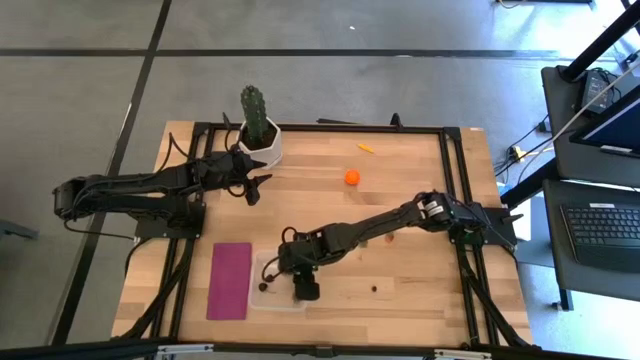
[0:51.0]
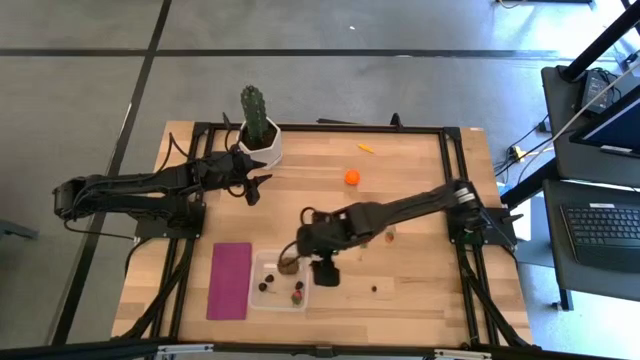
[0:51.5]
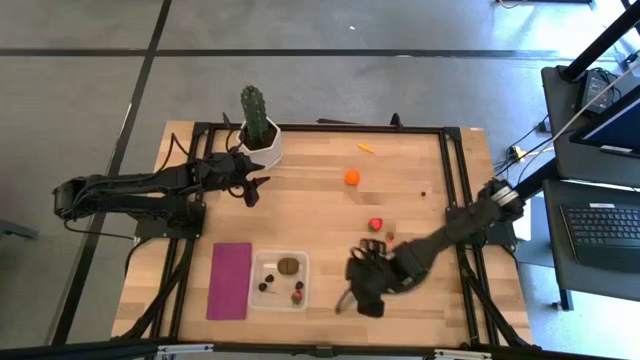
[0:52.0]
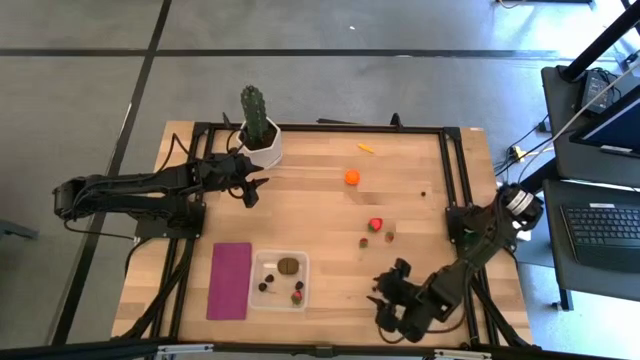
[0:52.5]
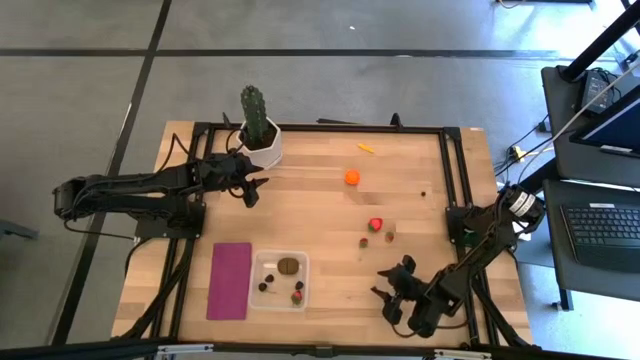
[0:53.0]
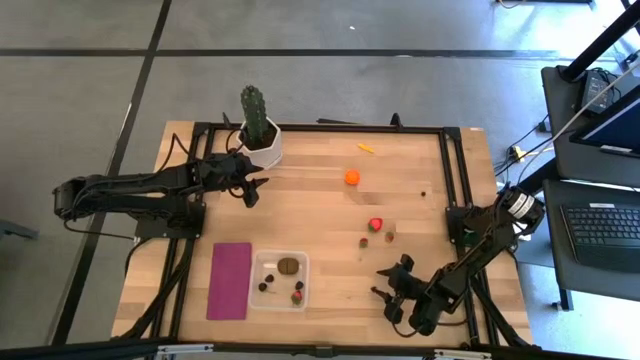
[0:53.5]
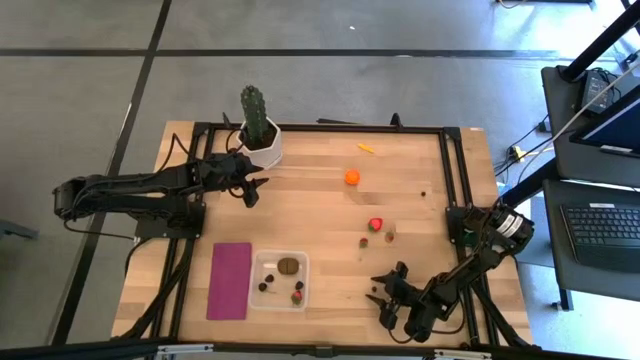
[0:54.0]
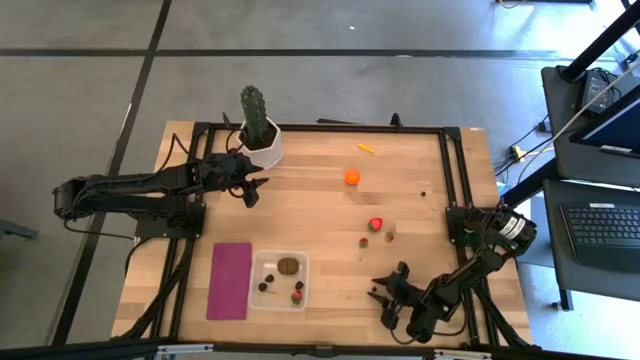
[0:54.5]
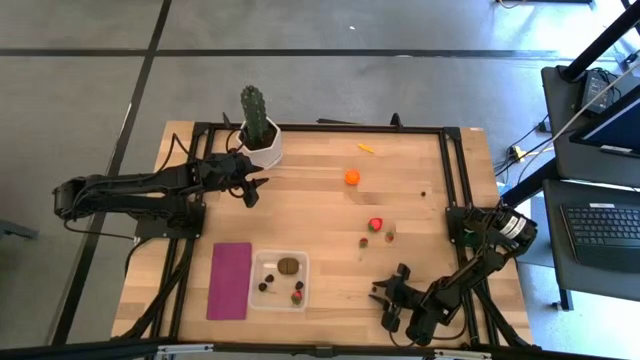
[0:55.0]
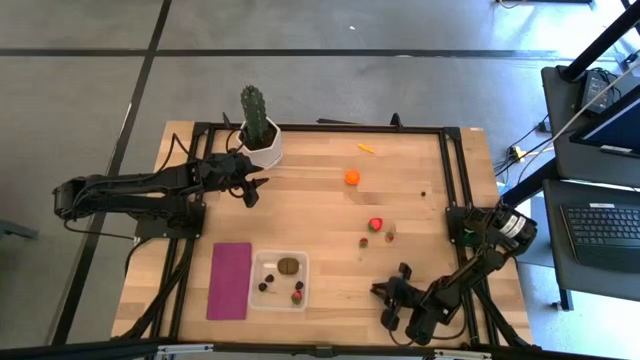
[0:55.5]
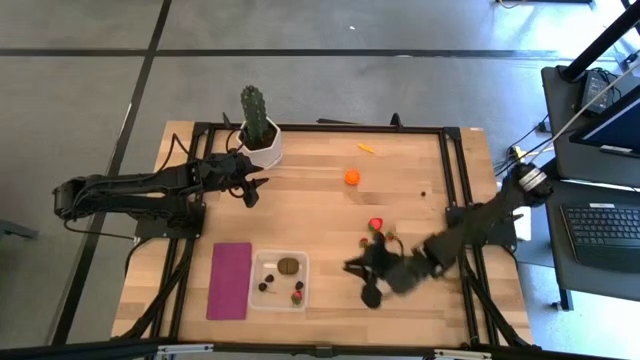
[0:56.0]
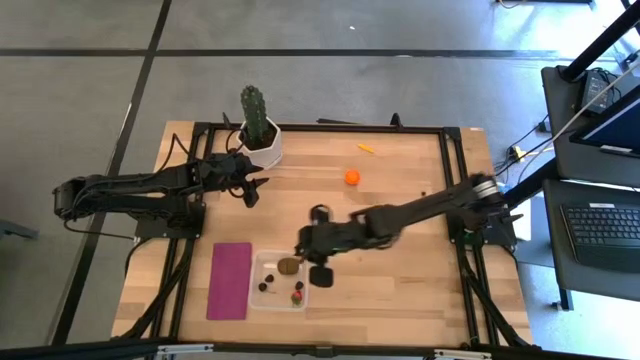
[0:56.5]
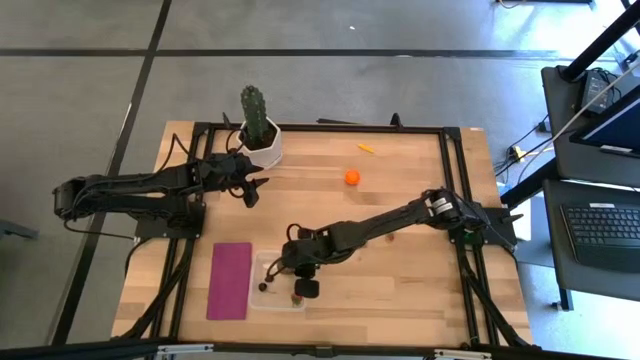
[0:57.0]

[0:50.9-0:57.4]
Task: Pick and placing Produce into tupperware
Put the blueberry into the transparent bin

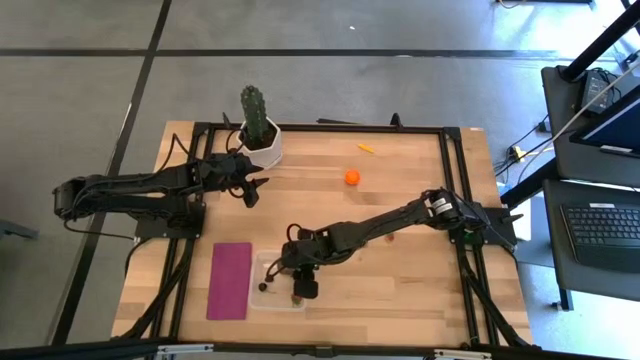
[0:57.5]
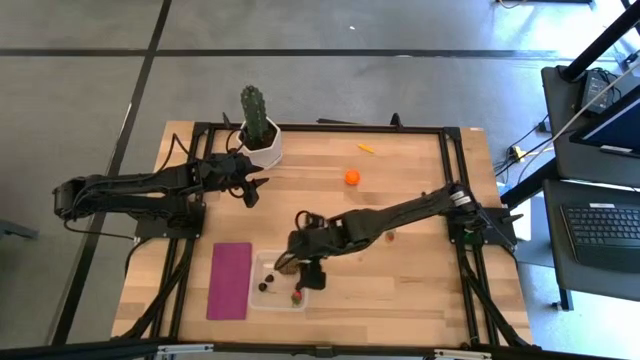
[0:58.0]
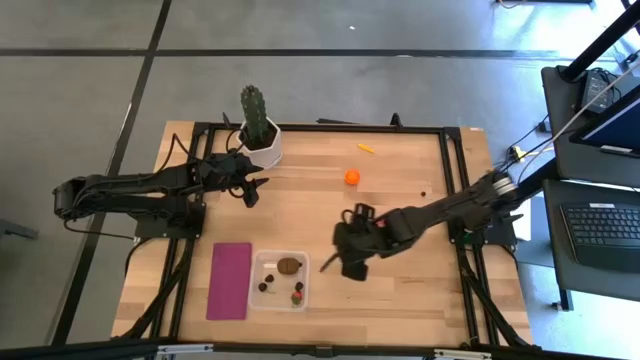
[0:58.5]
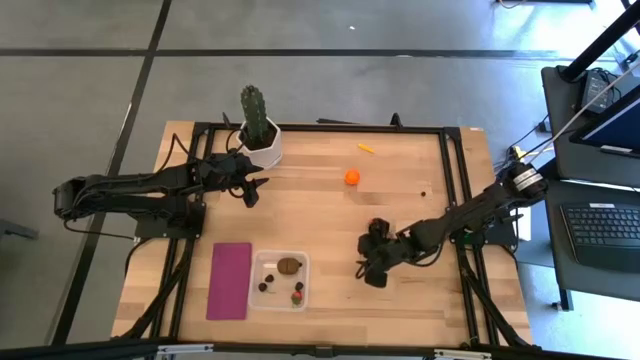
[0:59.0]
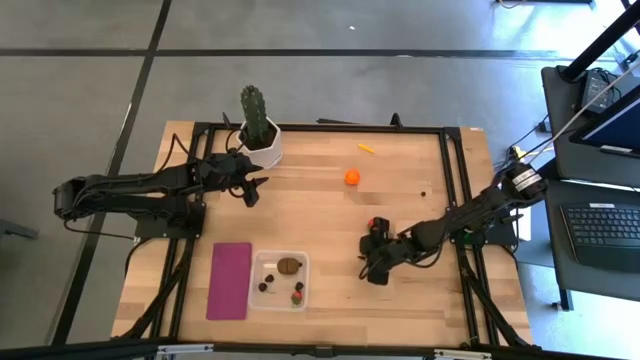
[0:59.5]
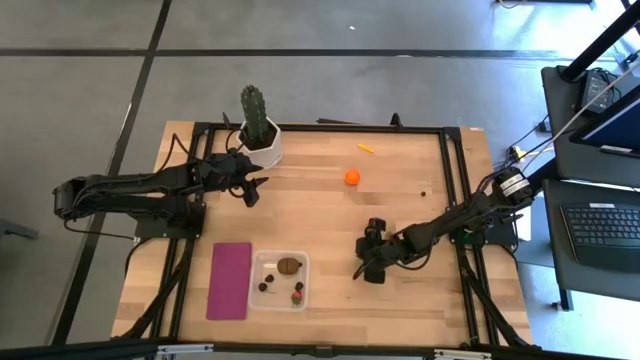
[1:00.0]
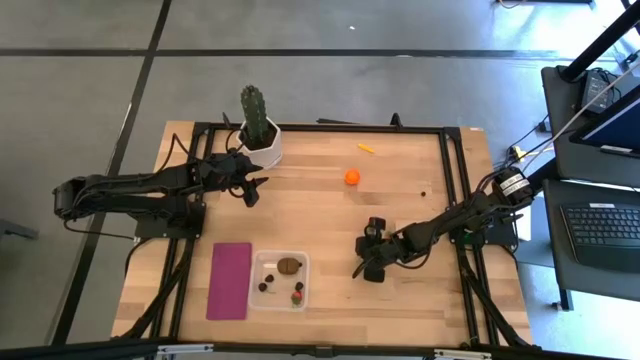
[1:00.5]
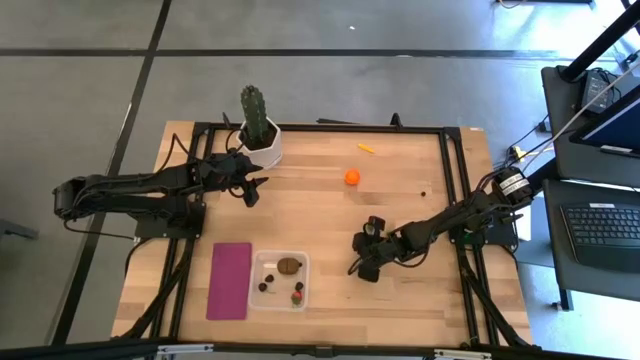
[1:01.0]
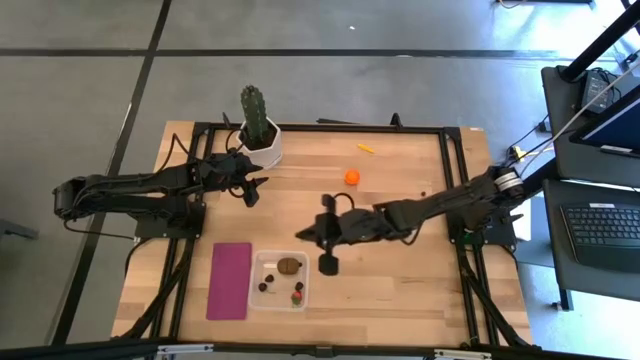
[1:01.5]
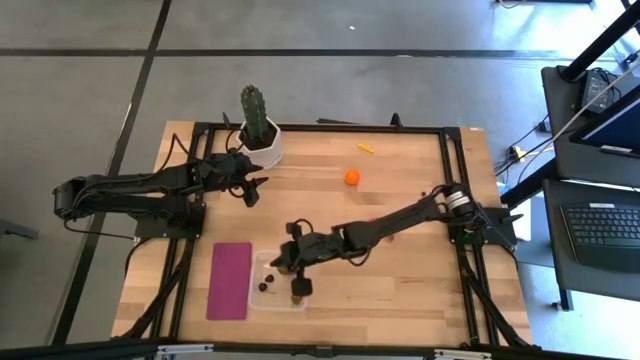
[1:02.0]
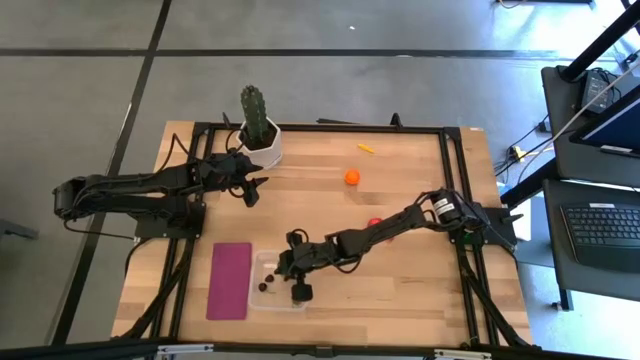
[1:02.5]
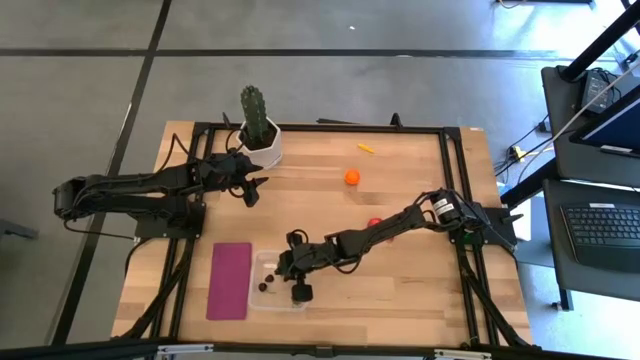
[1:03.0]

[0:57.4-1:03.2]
Put the strawberry into the transparent bin

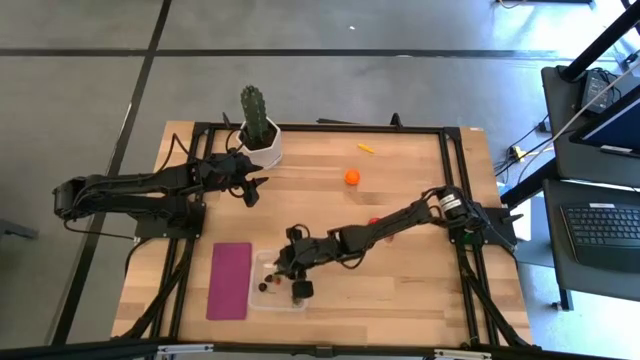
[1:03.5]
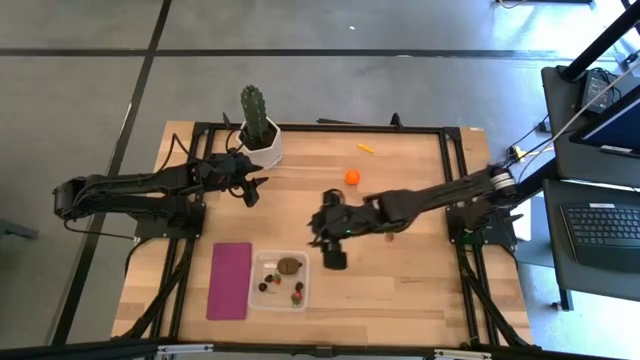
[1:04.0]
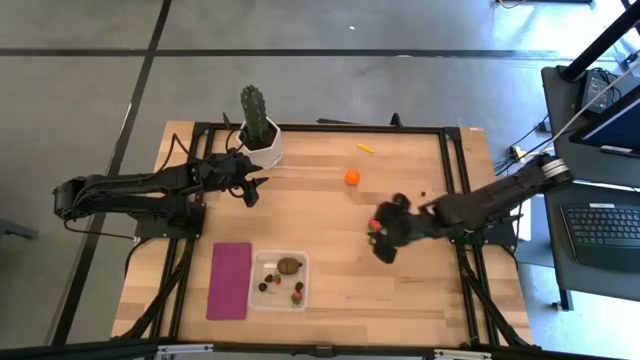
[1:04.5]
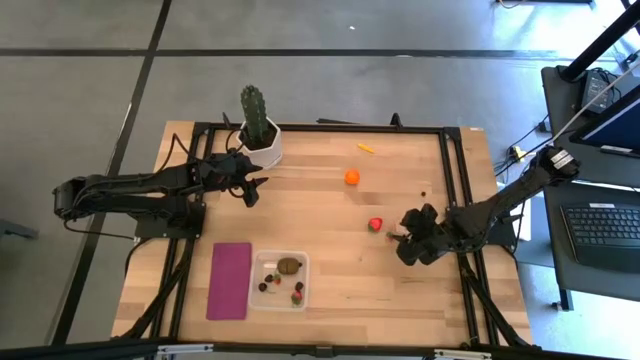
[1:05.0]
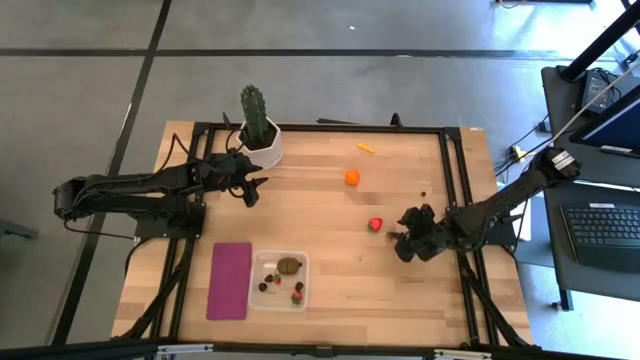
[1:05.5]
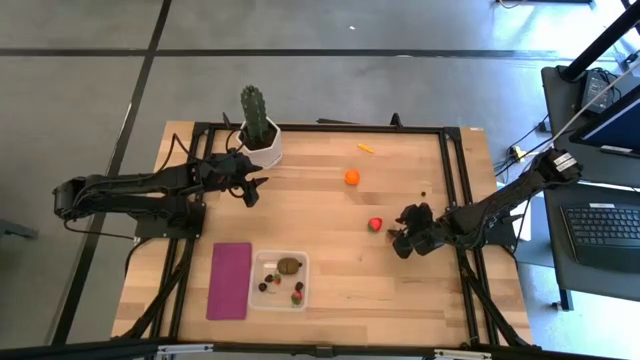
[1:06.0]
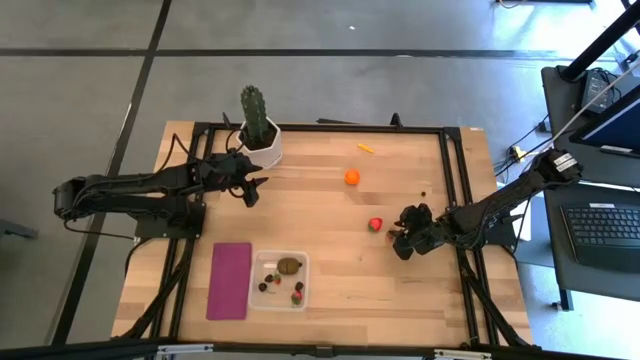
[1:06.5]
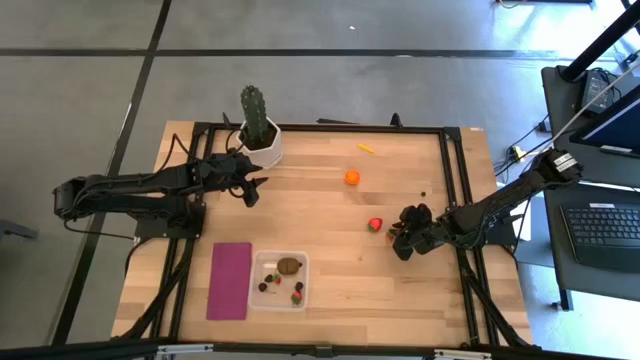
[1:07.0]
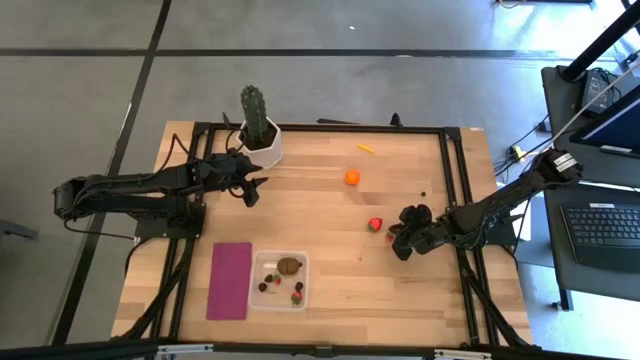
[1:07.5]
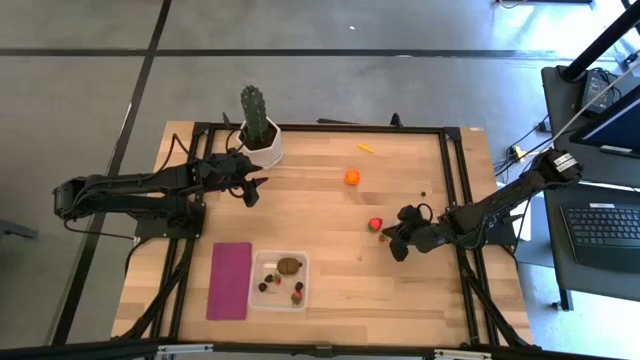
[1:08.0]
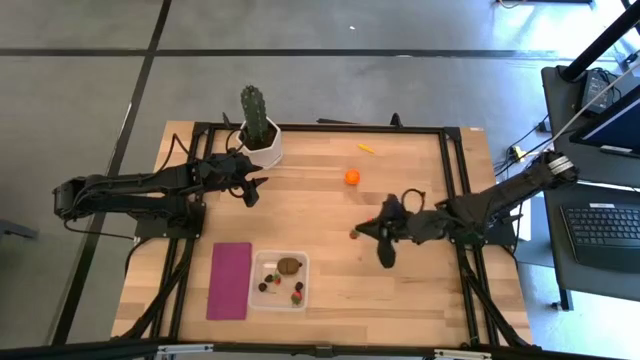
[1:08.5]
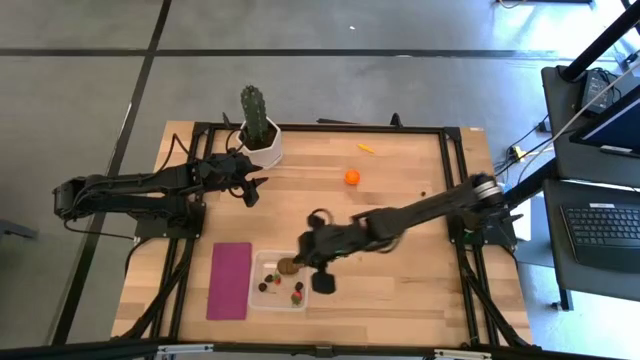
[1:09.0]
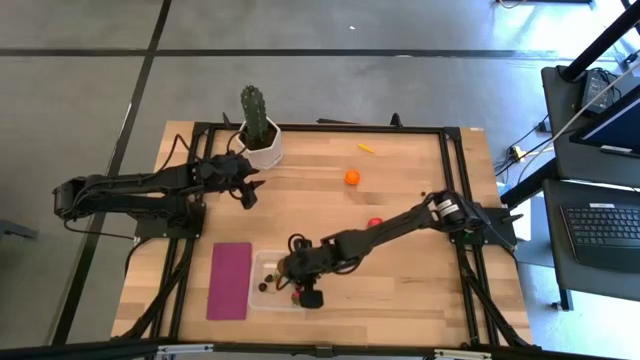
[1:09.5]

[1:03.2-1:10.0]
Put the strawberry into the transparent bin

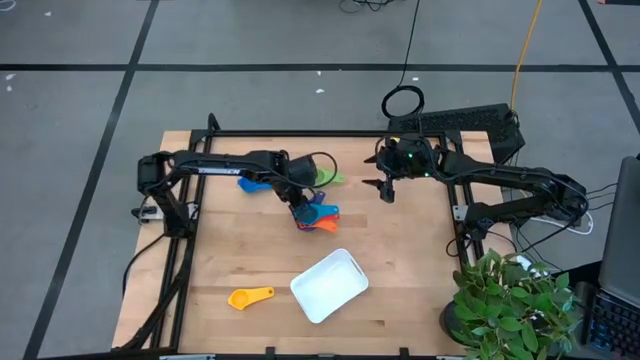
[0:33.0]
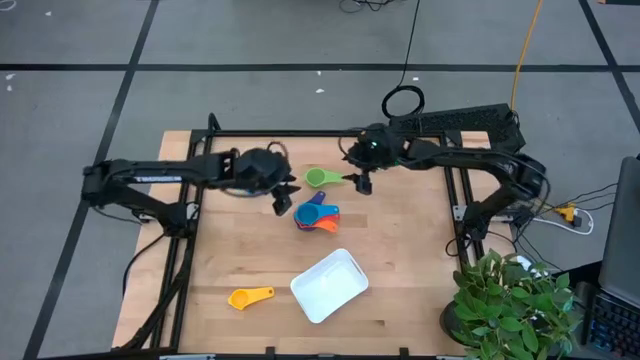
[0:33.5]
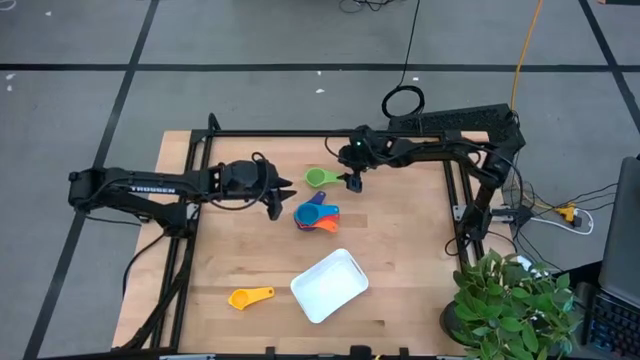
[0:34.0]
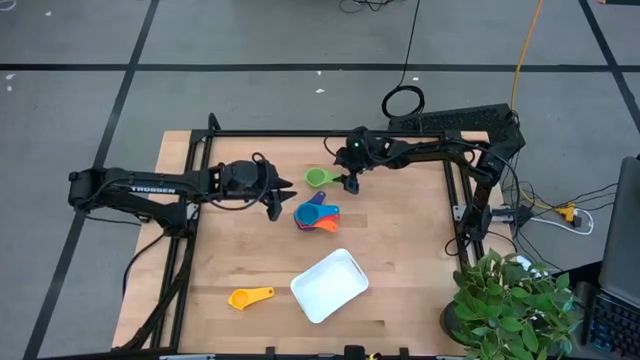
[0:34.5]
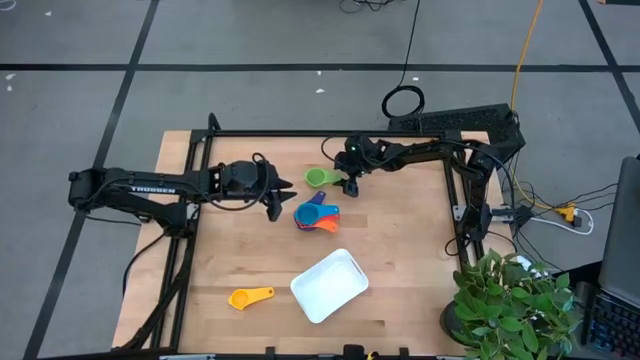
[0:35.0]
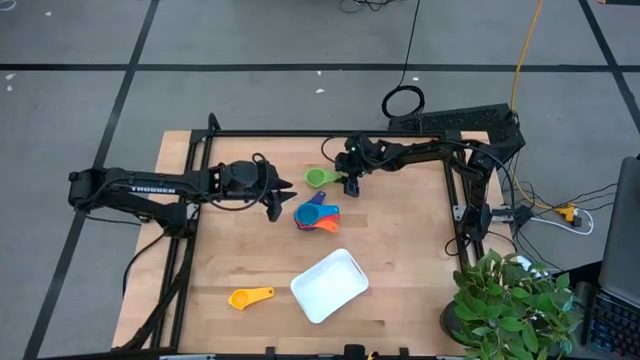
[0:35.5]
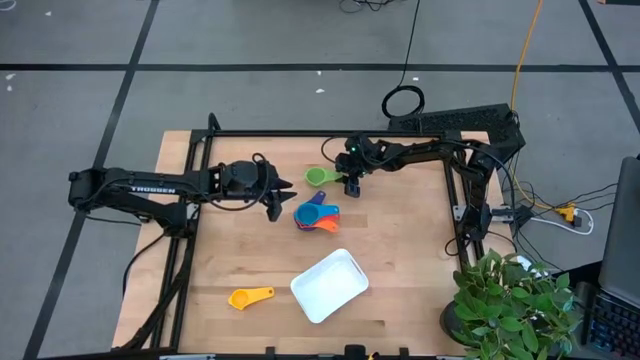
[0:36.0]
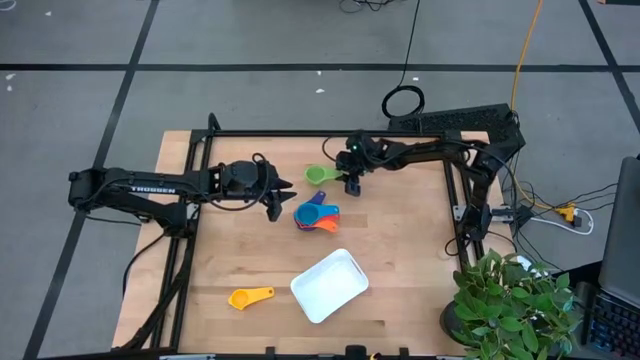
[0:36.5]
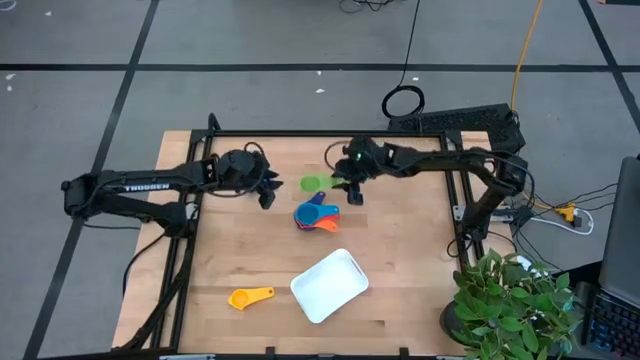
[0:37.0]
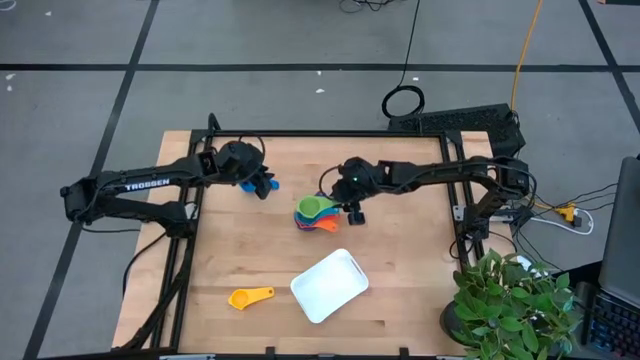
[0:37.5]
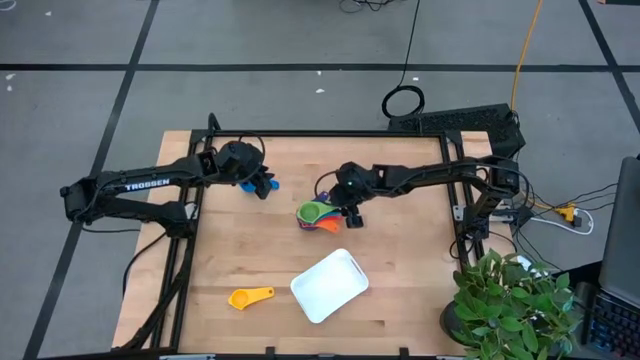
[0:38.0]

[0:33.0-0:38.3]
Task: Nest measuring cups in basket
Stack the green measuring cup on top of the light blue measuring cup
